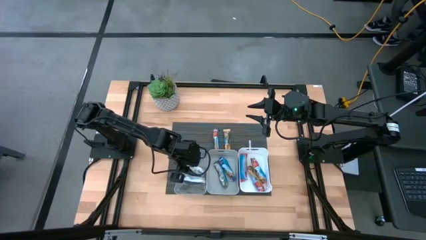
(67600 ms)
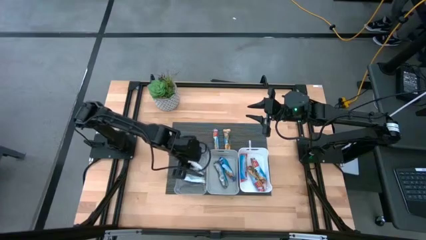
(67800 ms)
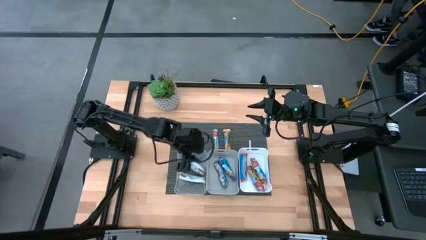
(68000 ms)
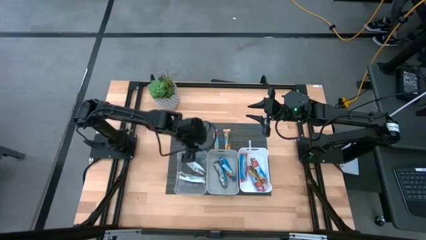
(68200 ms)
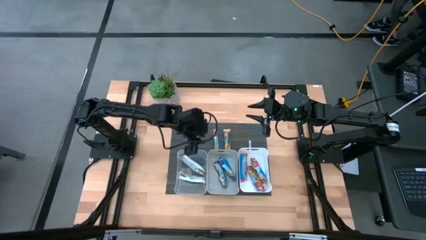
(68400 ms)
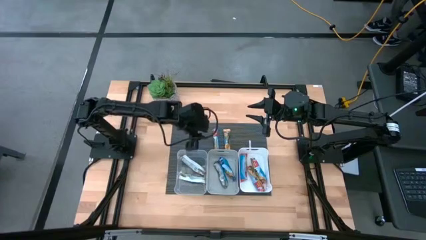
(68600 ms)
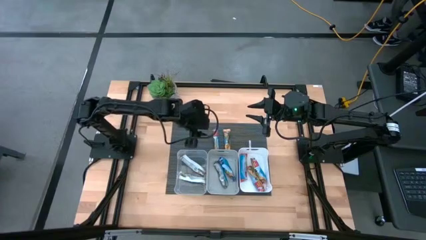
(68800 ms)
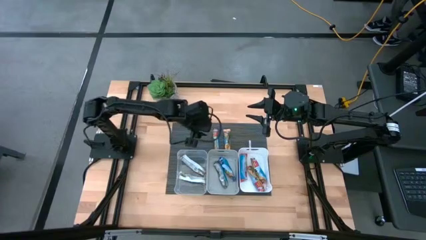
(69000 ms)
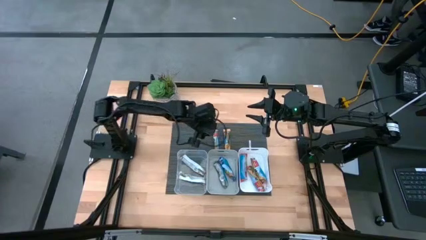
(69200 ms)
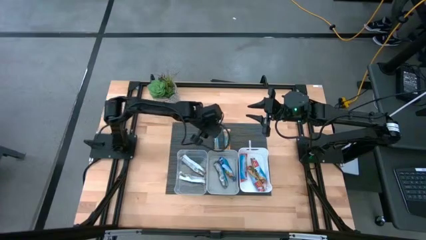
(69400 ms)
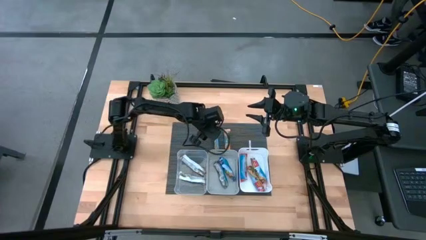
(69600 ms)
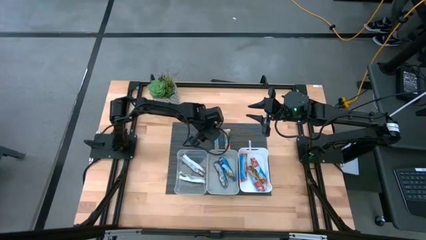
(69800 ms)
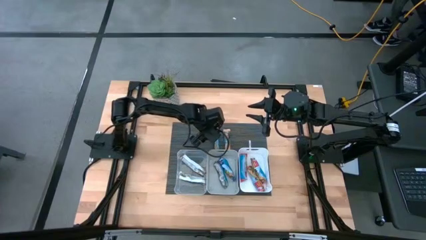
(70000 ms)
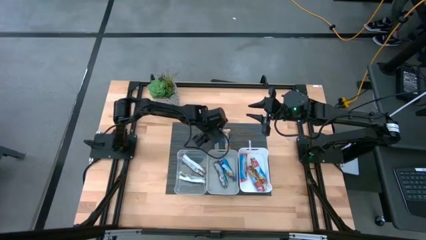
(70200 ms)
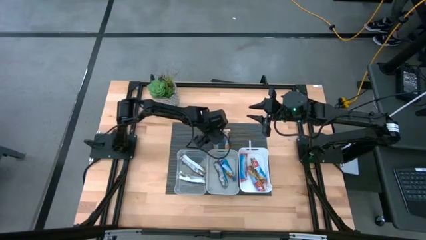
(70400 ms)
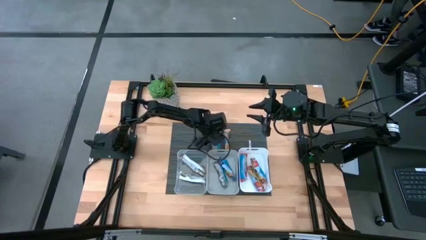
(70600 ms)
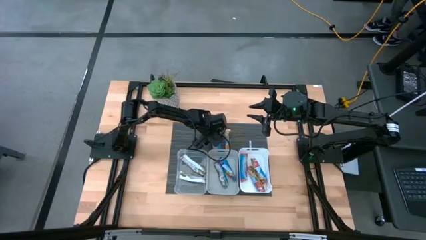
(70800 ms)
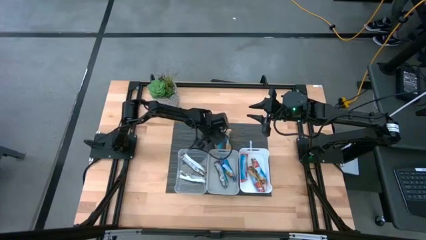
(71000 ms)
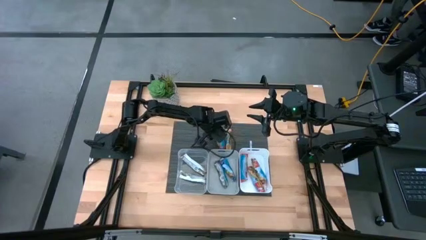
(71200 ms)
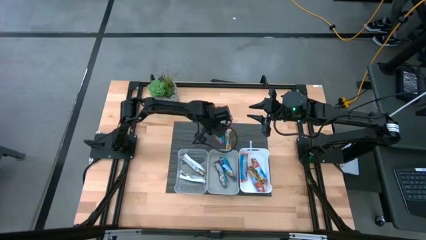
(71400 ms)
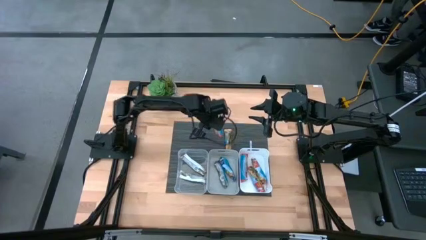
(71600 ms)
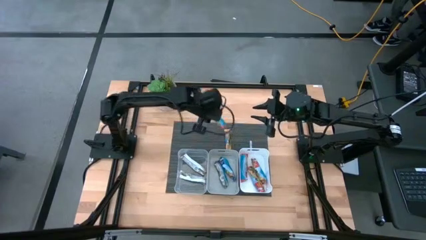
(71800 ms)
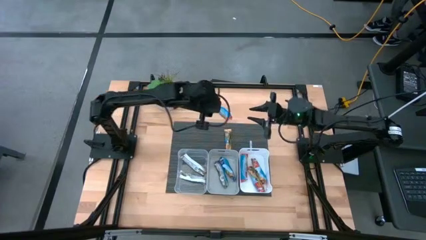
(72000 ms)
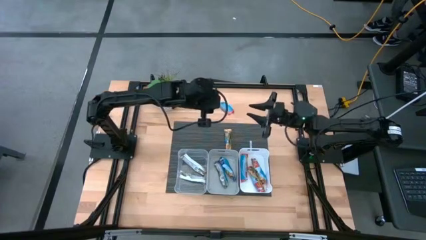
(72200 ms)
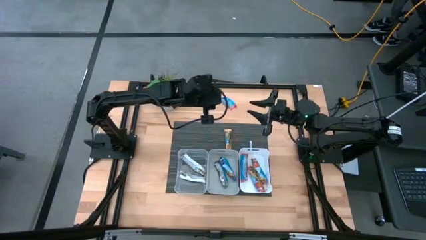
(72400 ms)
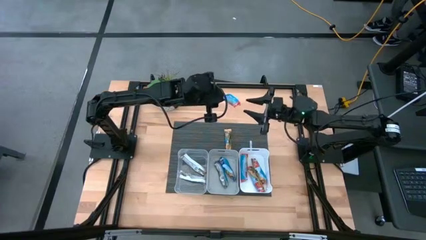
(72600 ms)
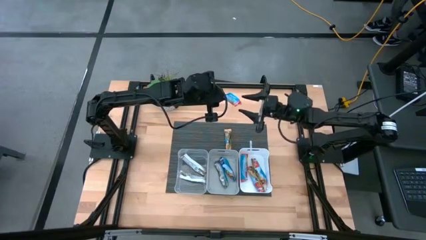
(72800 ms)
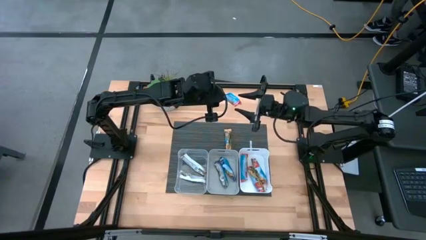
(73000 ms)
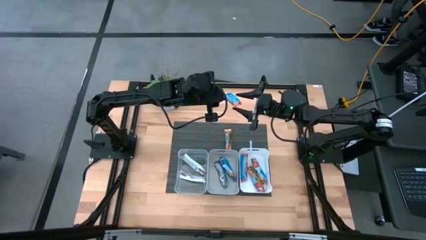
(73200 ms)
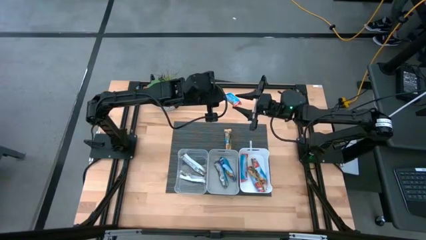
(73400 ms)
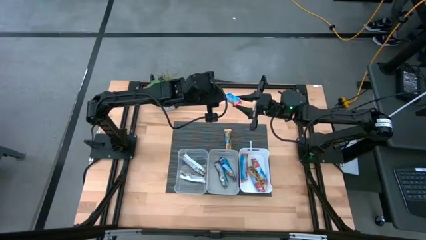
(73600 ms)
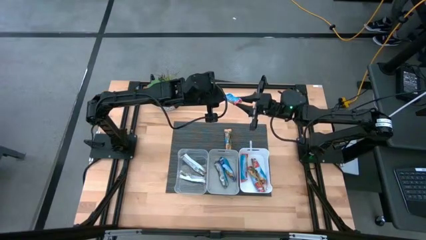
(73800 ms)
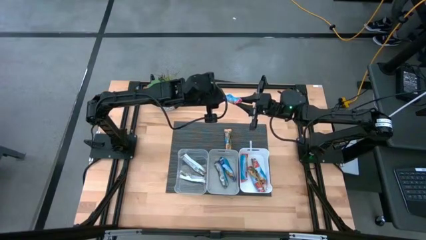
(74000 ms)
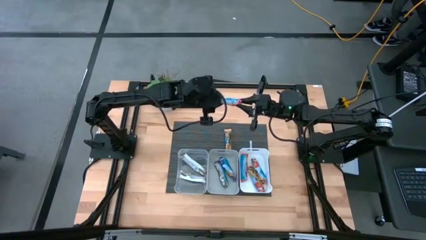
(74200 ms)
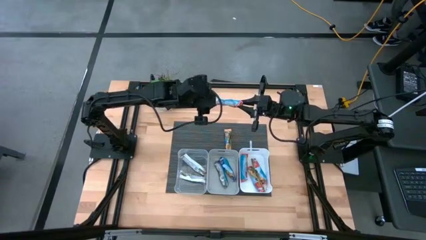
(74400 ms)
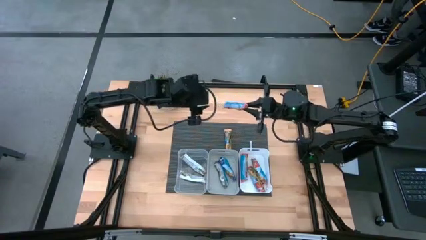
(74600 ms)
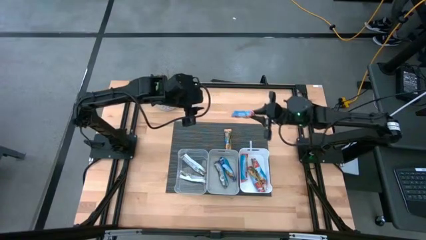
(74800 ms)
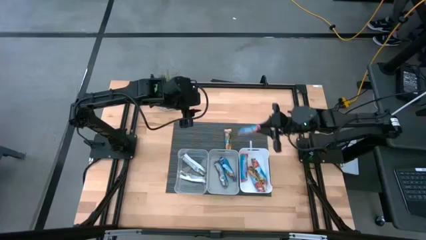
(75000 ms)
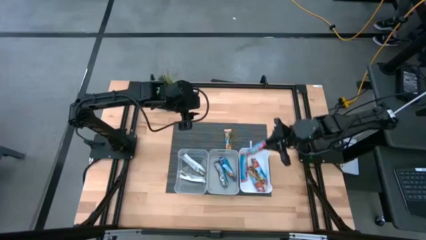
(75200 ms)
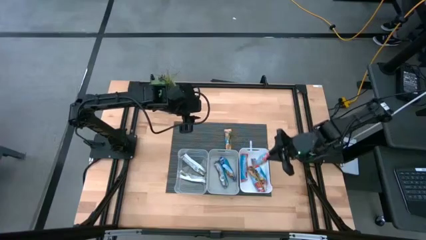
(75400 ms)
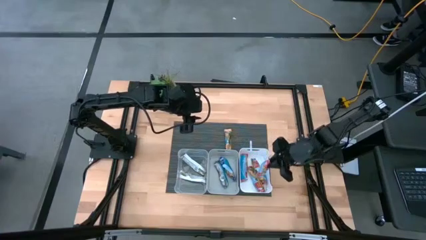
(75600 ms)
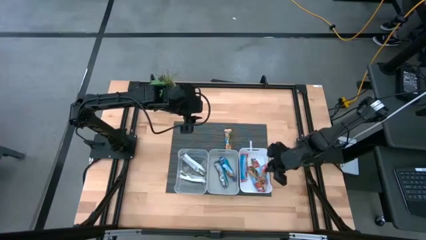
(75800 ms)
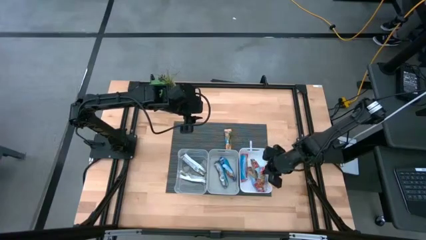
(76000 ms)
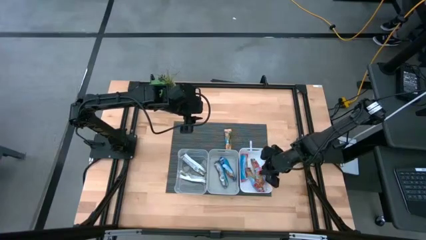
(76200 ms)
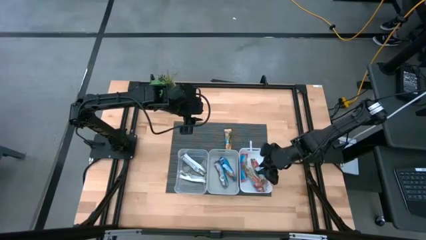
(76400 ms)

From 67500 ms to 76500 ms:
Task: Pick and place Granola Bars by type
Put the red granola bar into the white bin

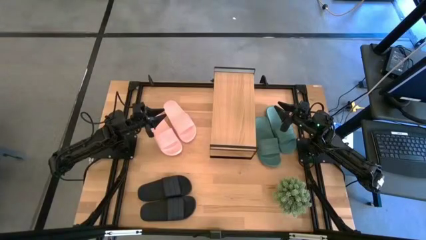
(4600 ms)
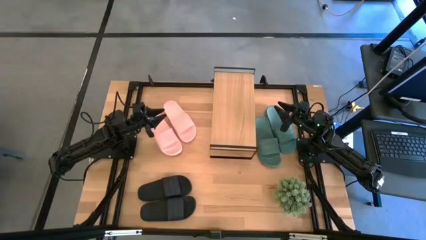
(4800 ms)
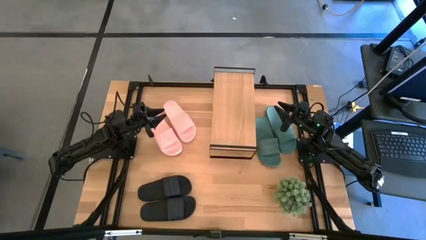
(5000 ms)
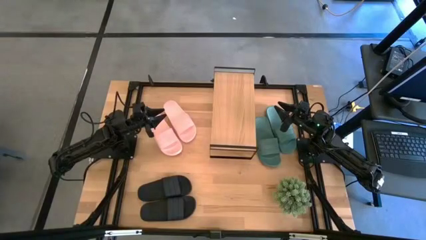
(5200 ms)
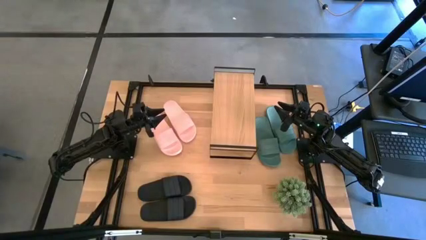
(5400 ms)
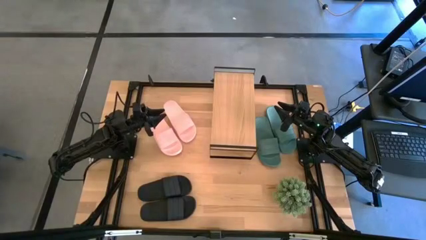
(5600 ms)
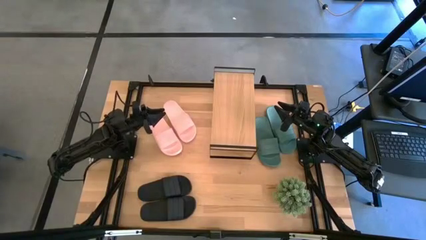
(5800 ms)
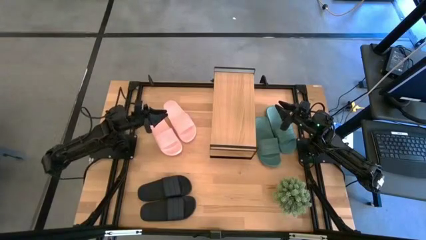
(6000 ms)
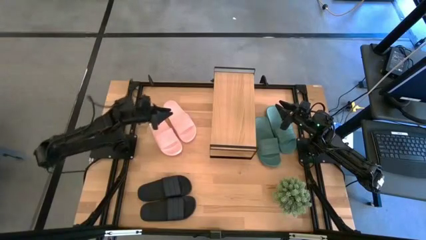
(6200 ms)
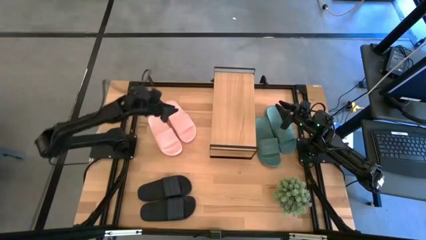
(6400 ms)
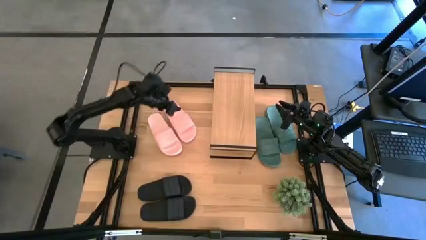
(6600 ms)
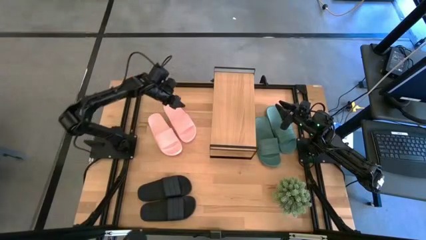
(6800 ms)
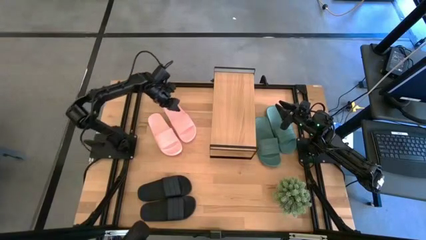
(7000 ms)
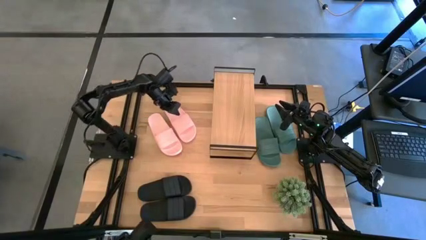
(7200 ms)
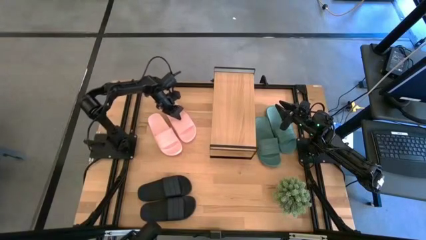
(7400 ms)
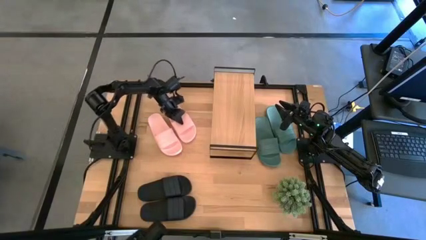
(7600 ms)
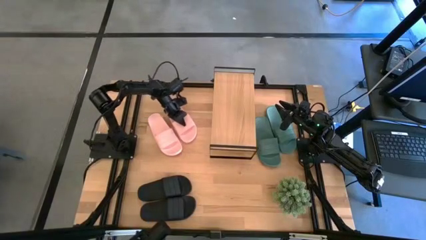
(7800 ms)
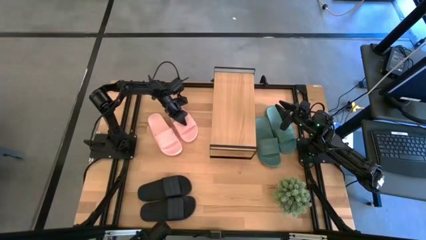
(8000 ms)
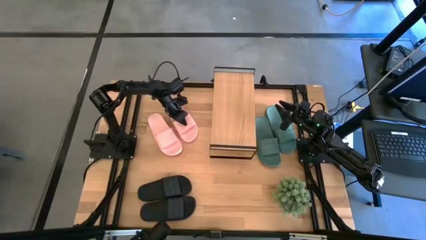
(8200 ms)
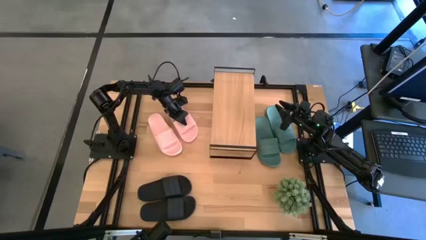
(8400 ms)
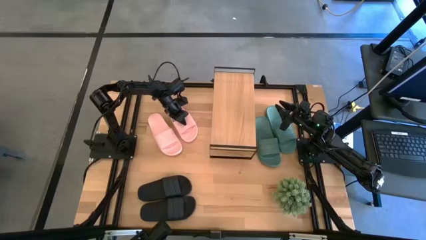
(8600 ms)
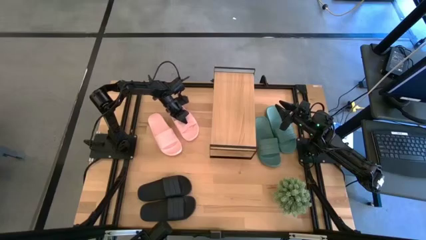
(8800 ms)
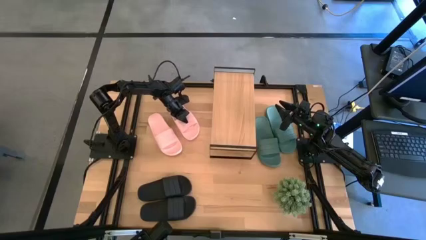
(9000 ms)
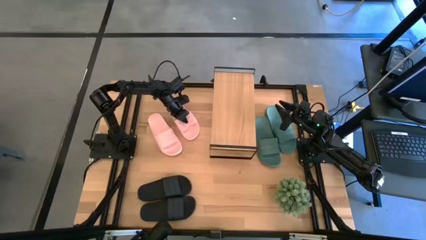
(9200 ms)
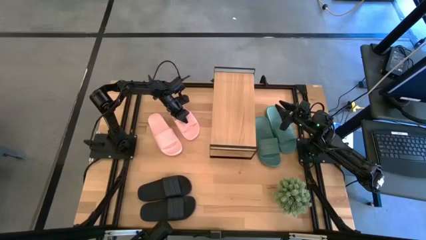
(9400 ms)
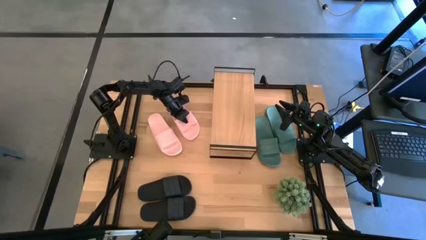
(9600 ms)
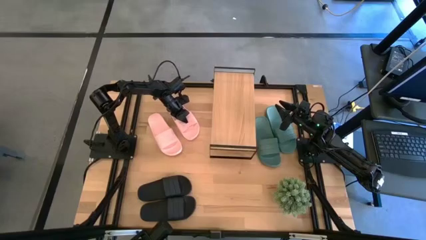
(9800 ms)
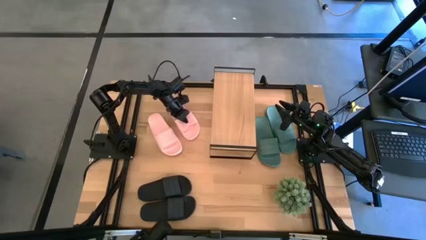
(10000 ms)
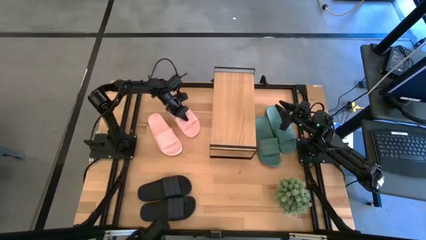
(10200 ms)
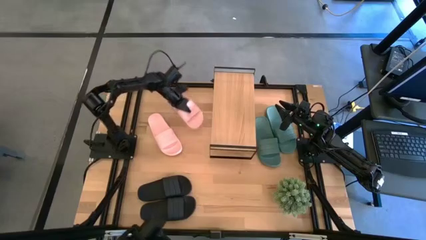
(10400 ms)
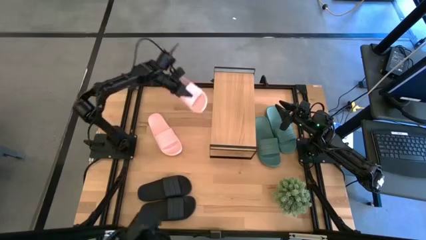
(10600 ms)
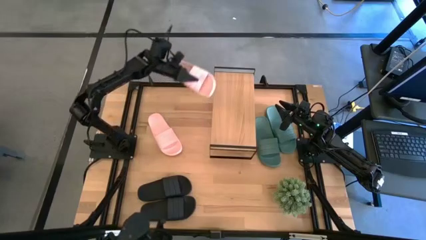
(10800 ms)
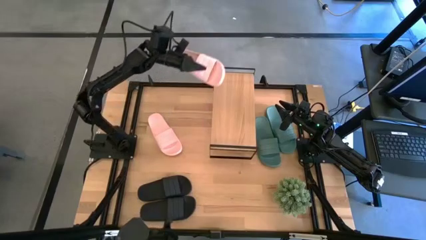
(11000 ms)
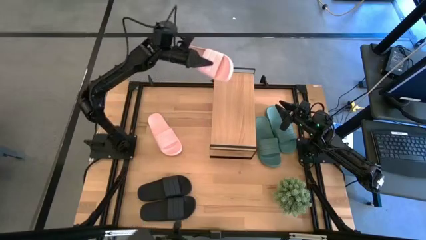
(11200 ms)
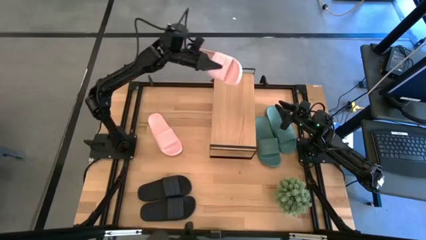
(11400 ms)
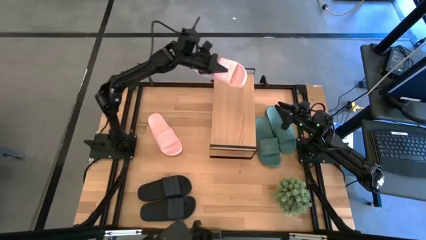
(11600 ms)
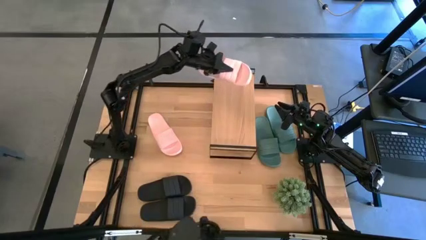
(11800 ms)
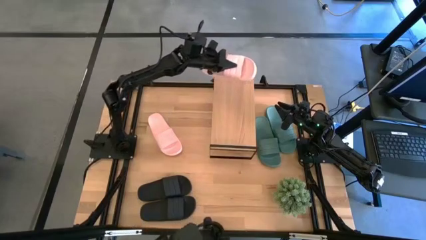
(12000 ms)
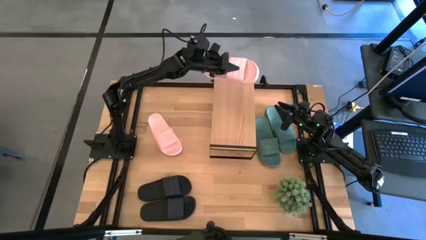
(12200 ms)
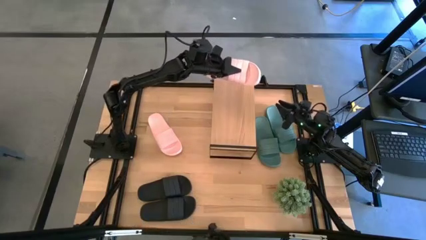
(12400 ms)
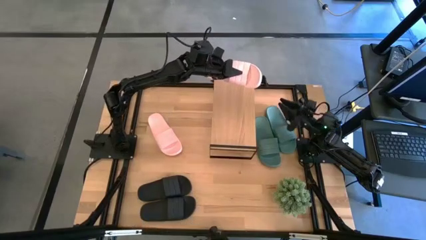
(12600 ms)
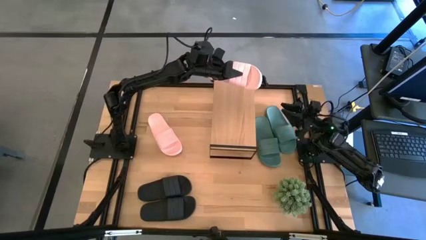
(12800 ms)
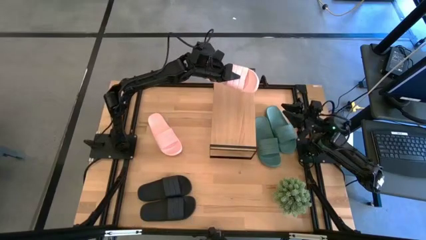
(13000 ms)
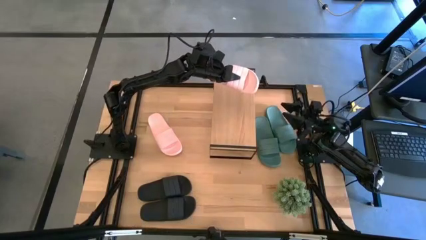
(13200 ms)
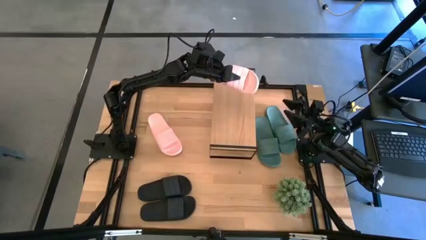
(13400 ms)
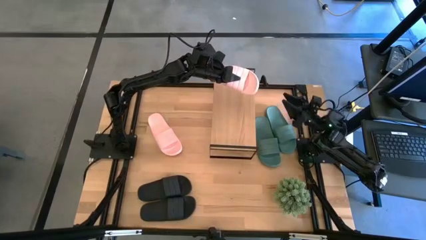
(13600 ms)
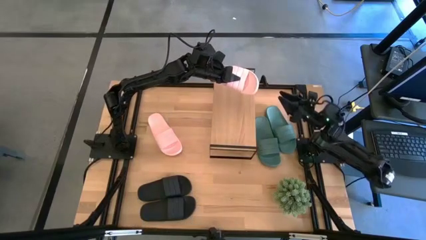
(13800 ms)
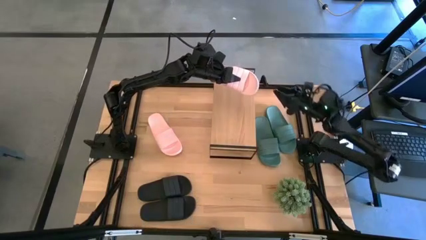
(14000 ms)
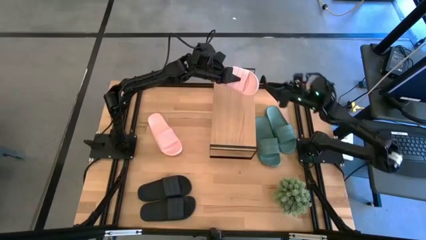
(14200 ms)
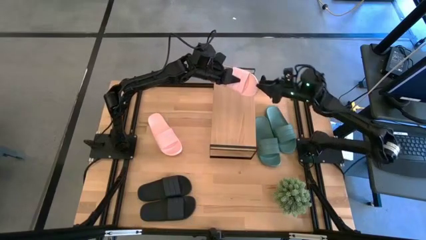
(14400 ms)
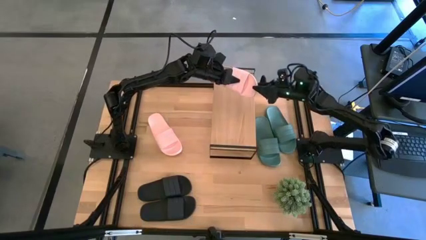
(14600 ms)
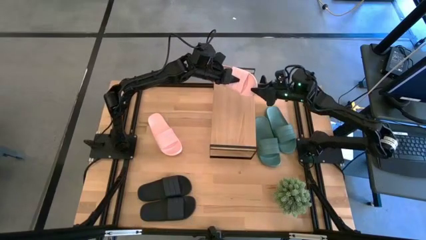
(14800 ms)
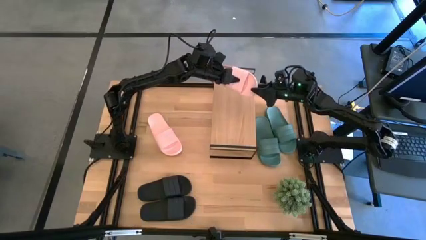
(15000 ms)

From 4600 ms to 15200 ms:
Task: Pick and place slides into the shelf
Put the right pink slide on the shelf
